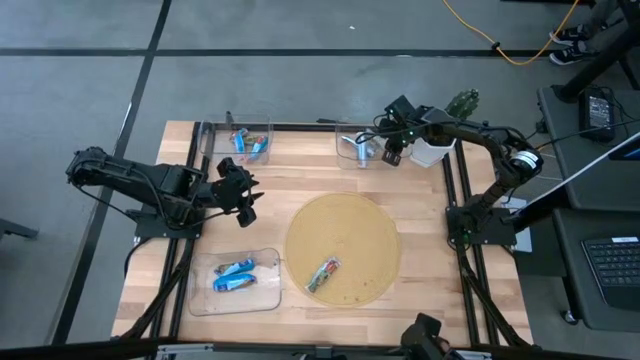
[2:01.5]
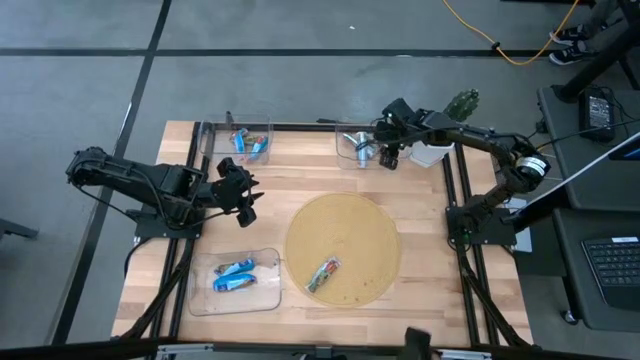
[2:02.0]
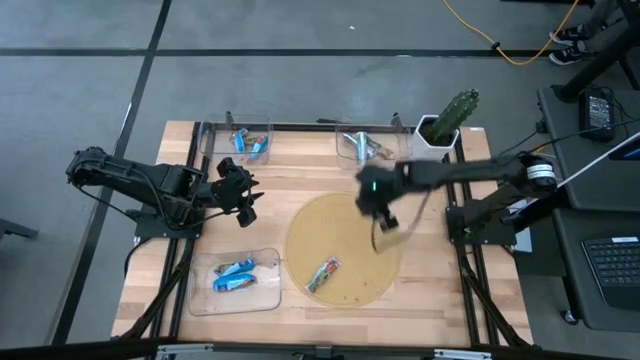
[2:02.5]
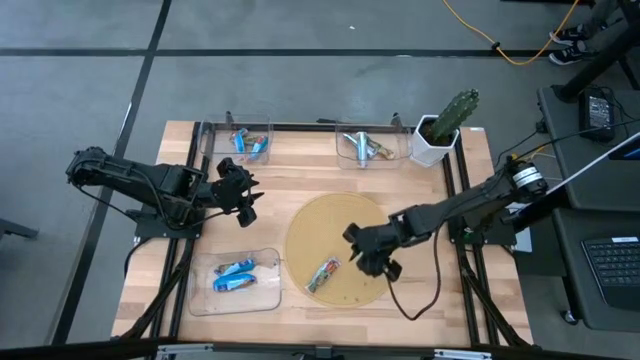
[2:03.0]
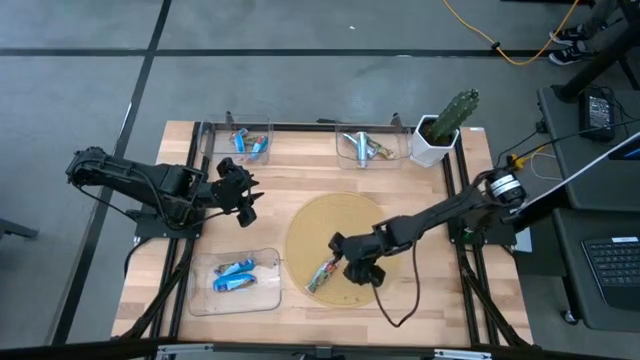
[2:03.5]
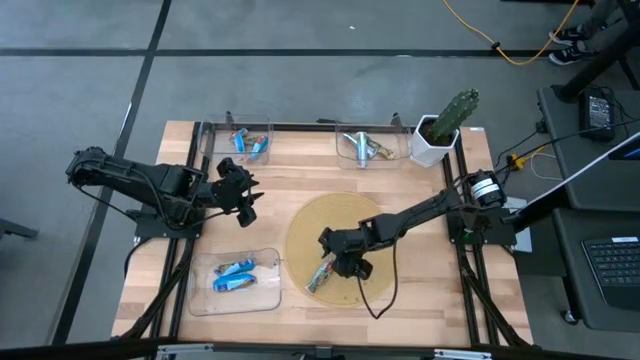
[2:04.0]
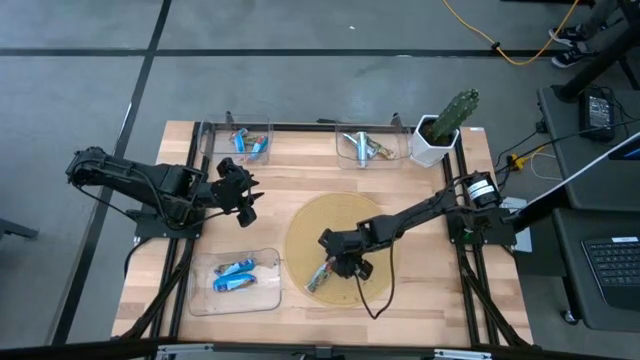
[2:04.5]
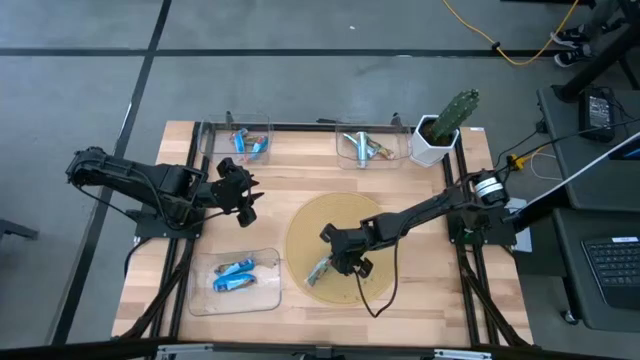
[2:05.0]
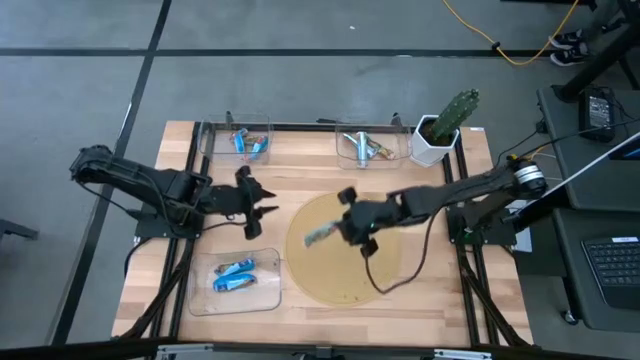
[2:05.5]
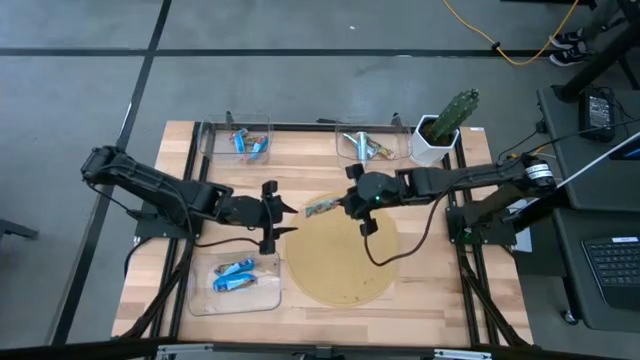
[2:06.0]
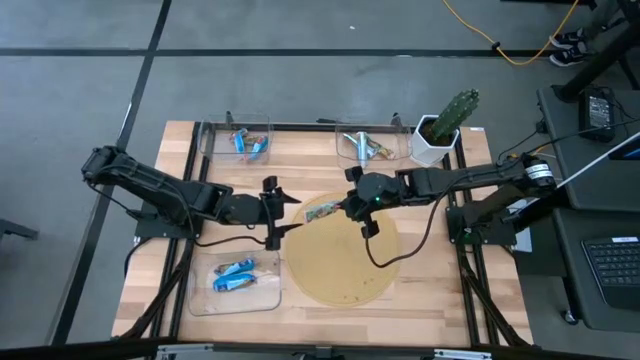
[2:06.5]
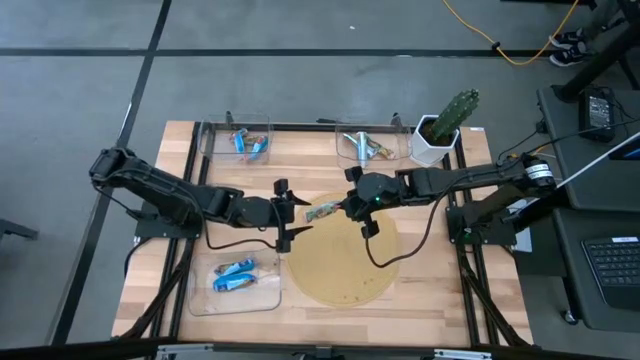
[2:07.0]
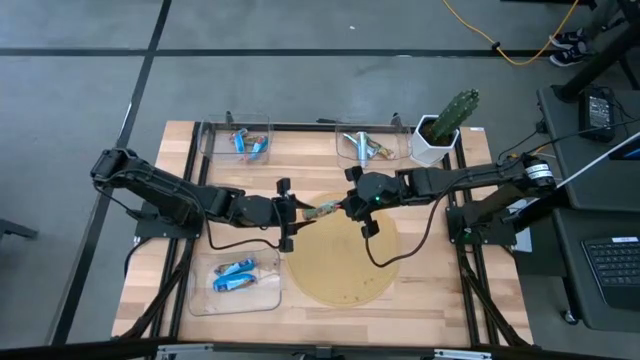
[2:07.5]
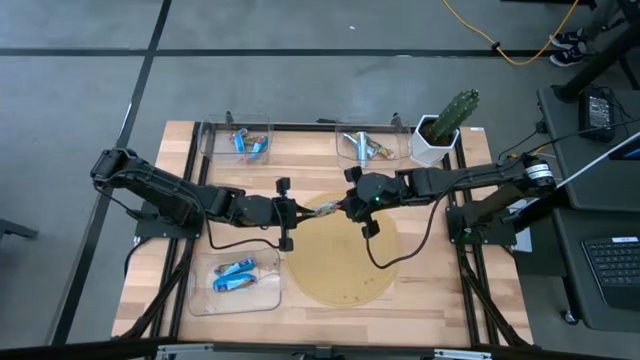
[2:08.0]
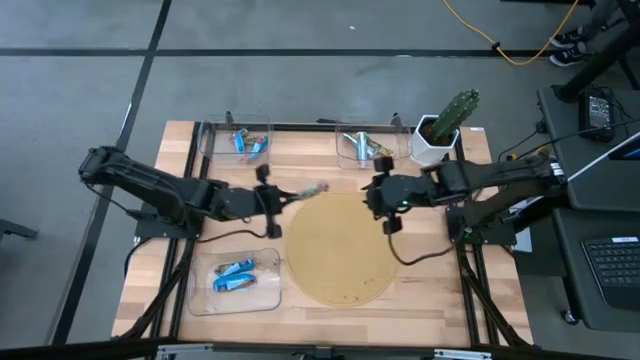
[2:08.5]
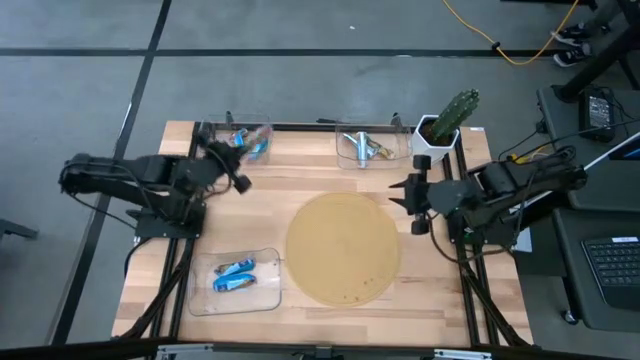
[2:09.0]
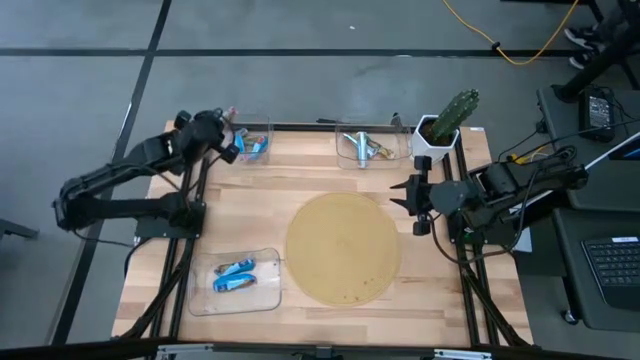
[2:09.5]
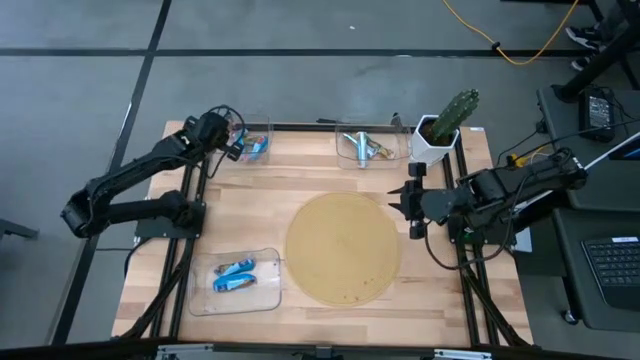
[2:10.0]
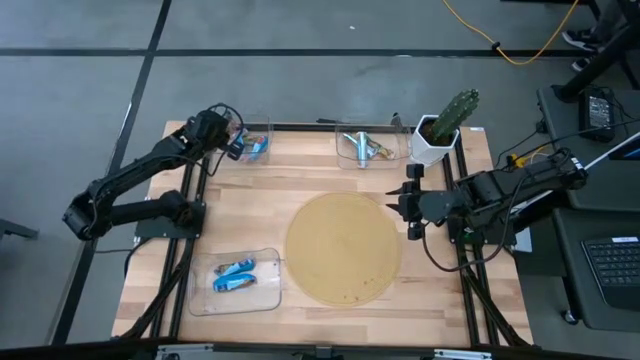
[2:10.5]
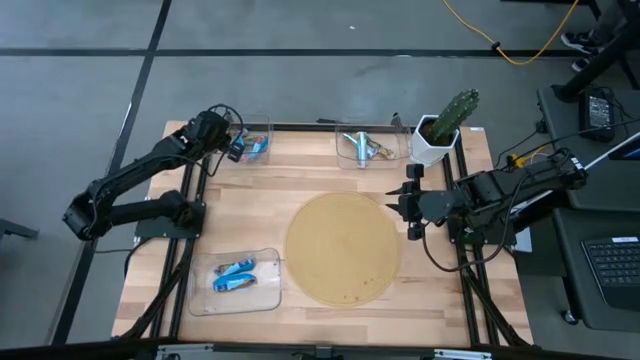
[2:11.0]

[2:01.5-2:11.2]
Task: Pick and place Granola Bars by type
Put the red granola bar into the top left transparent bin

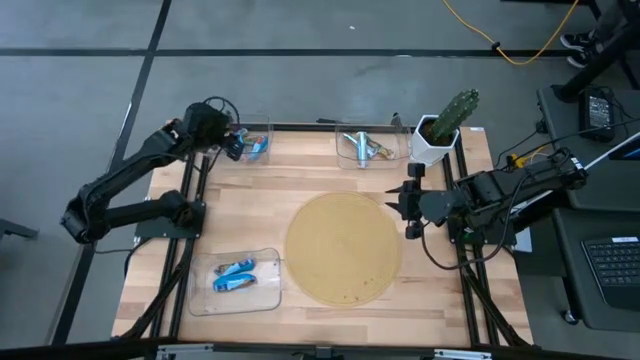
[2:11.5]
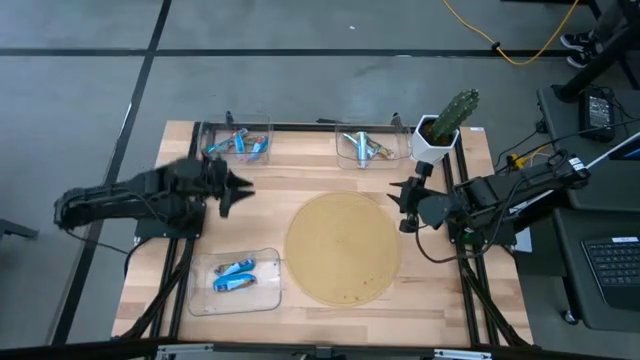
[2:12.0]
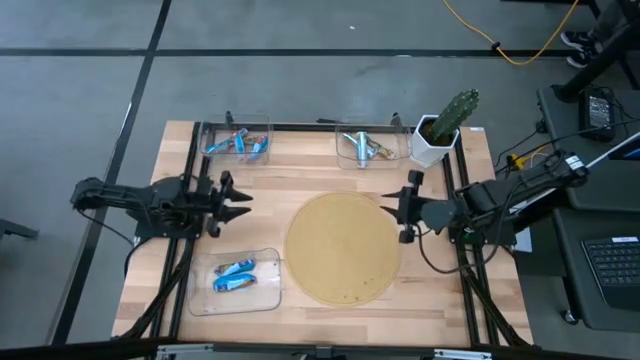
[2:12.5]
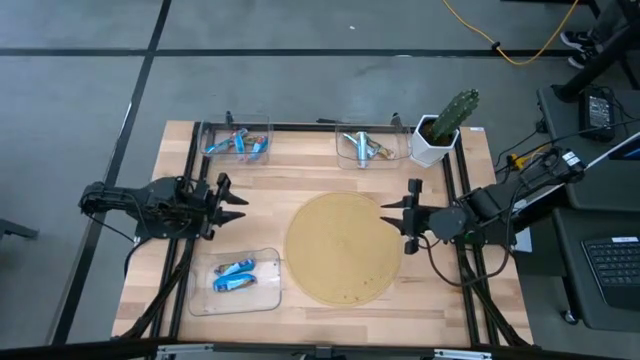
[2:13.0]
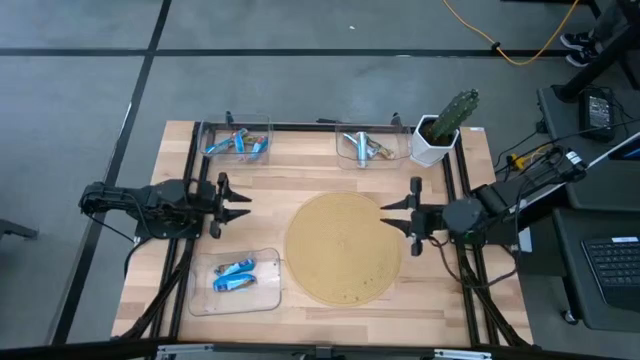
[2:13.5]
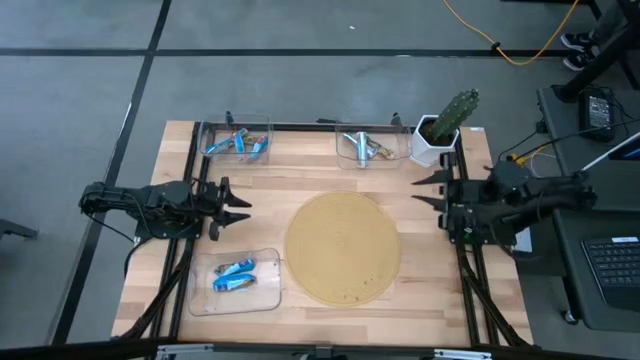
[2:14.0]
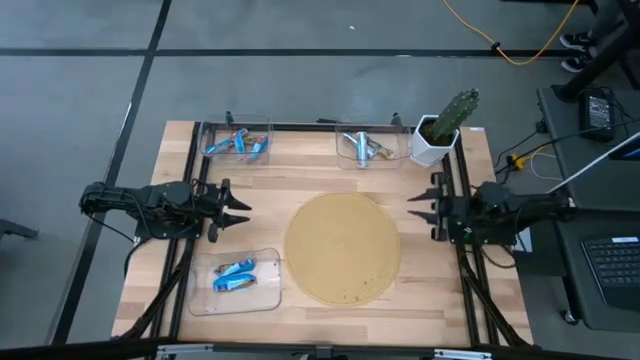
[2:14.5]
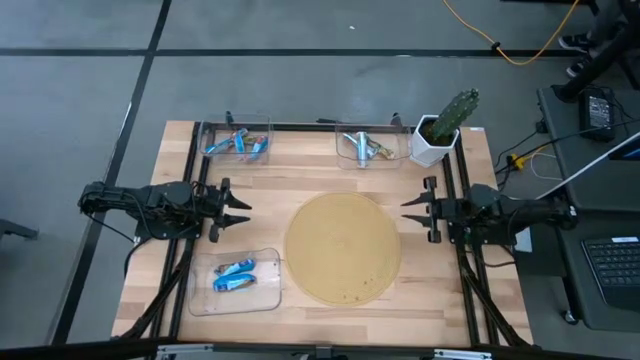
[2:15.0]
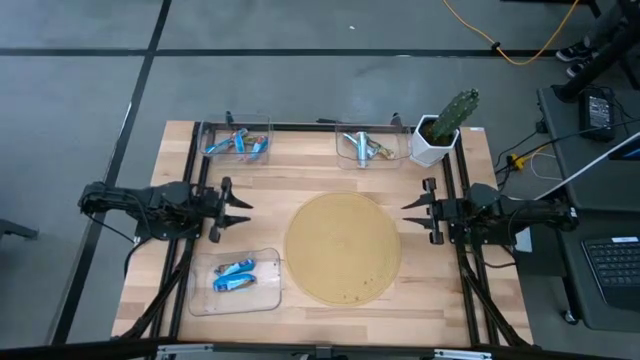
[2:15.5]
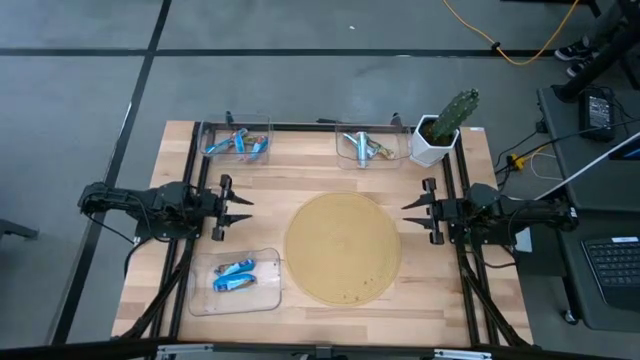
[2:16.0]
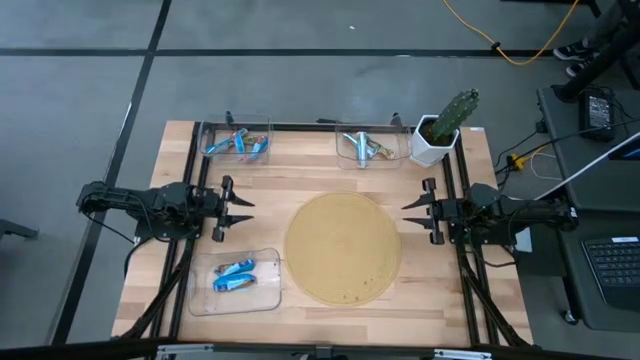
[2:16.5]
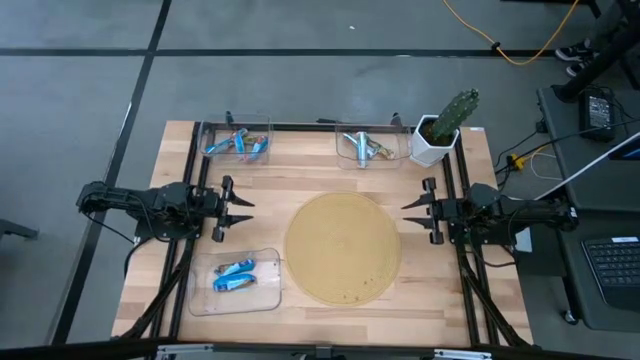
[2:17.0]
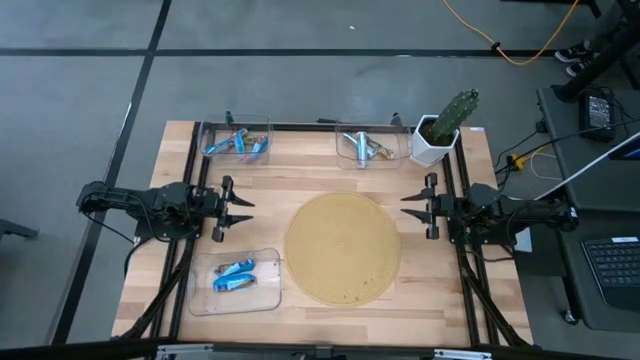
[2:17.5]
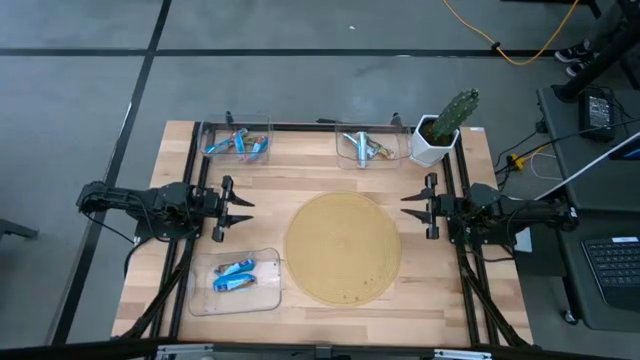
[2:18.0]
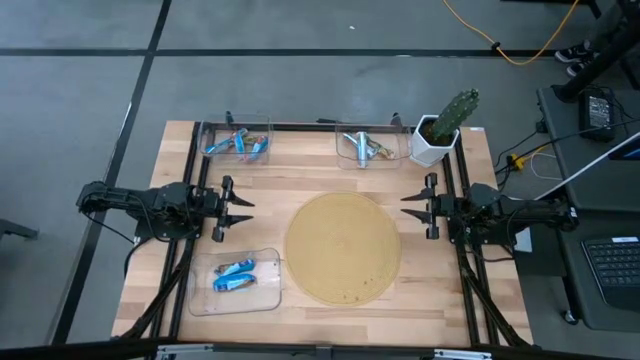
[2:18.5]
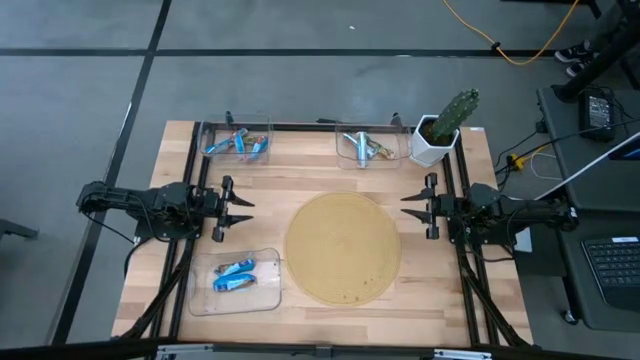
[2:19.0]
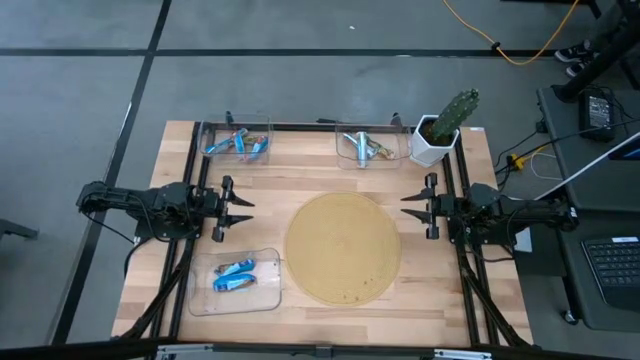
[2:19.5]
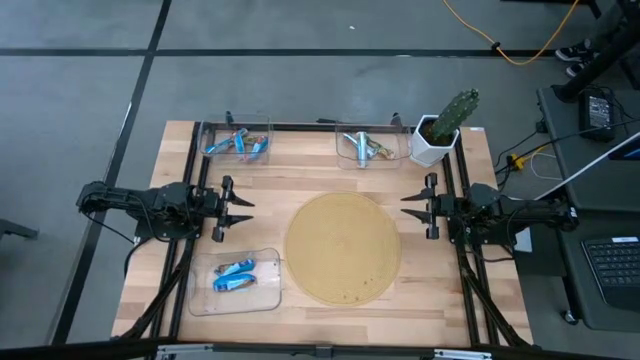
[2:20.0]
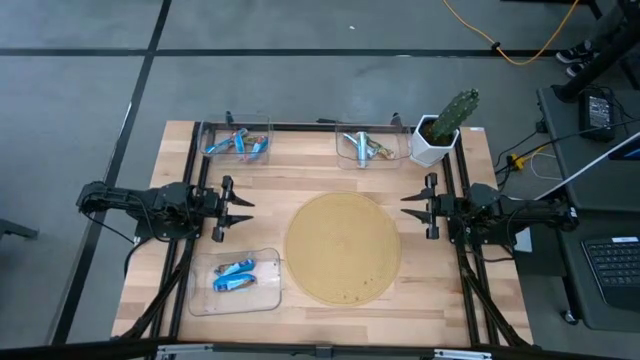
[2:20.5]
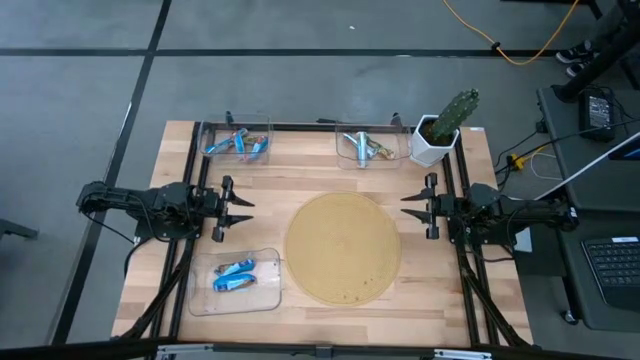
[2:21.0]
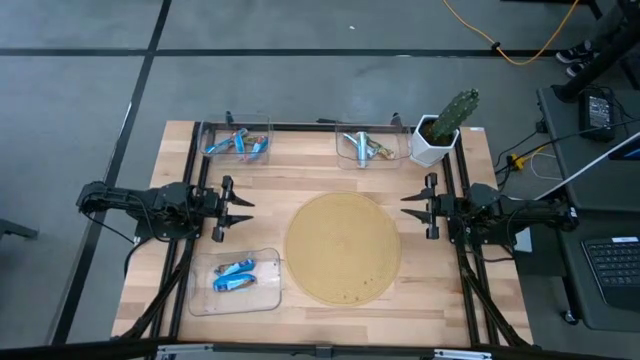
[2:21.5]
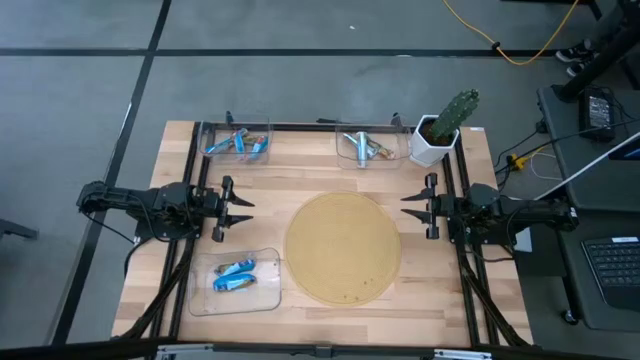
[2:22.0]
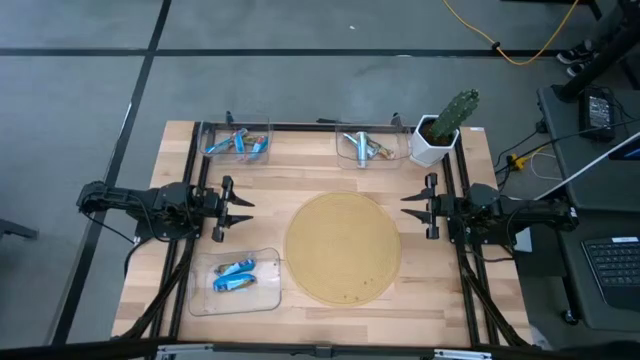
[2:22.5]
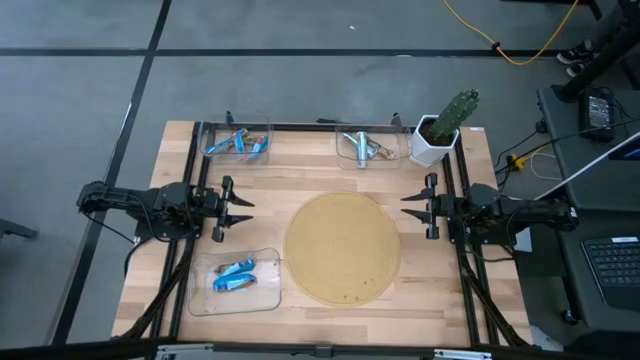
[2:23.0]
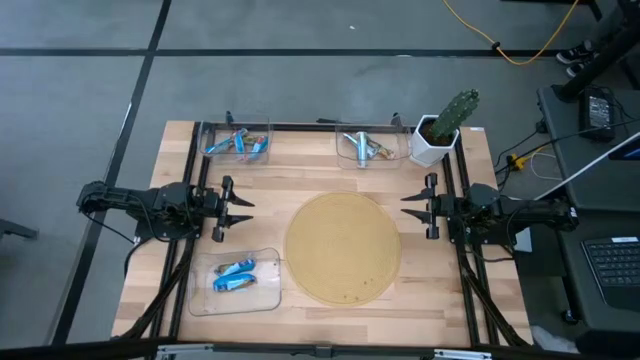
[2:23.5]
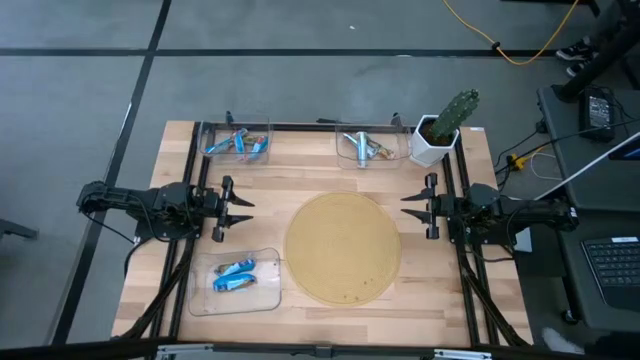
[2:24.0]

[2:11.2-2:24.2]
Return to Home Position
